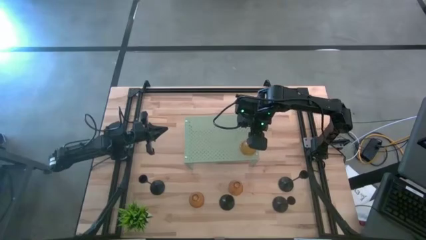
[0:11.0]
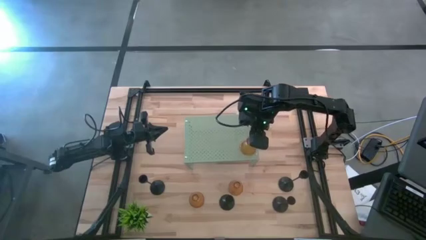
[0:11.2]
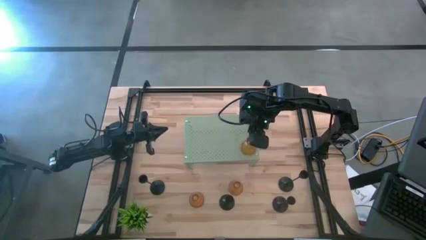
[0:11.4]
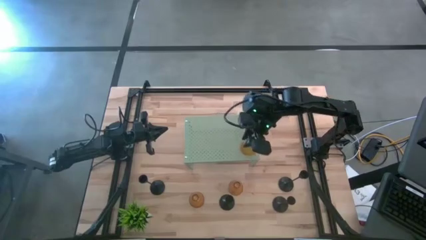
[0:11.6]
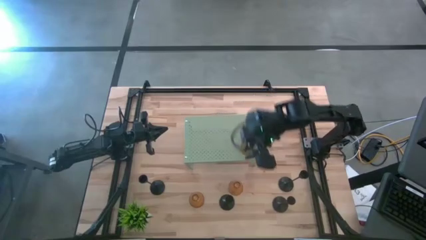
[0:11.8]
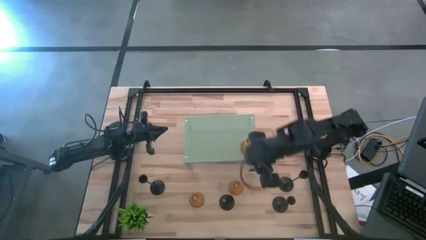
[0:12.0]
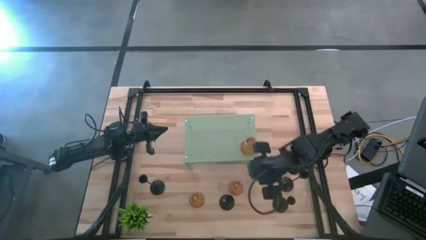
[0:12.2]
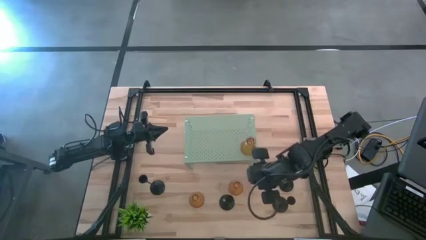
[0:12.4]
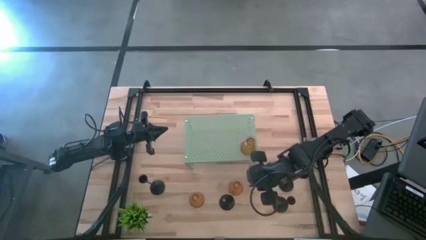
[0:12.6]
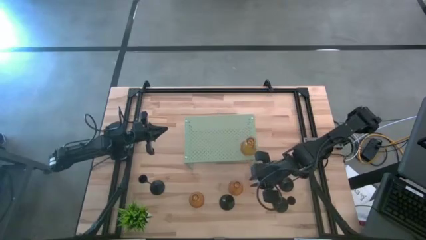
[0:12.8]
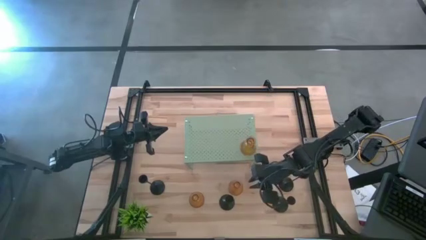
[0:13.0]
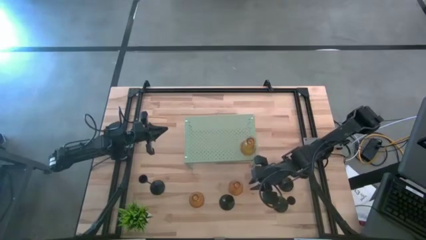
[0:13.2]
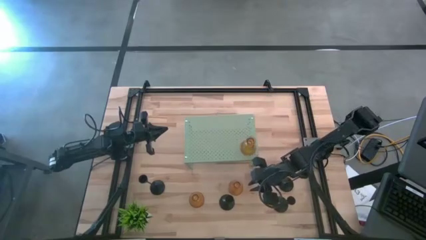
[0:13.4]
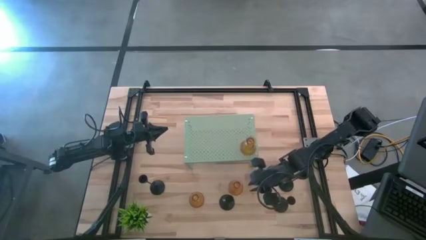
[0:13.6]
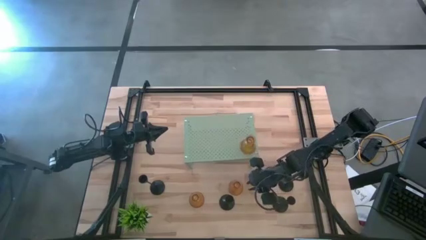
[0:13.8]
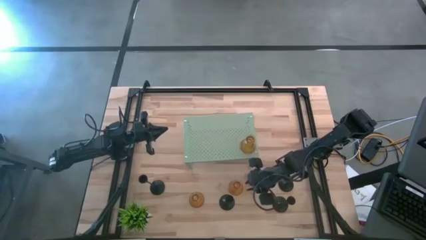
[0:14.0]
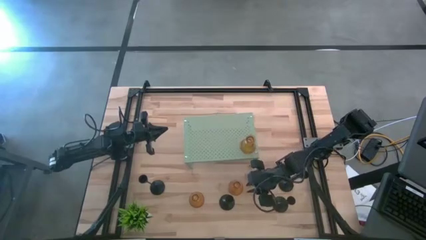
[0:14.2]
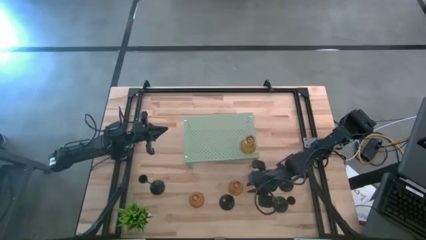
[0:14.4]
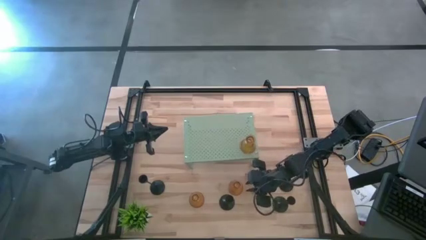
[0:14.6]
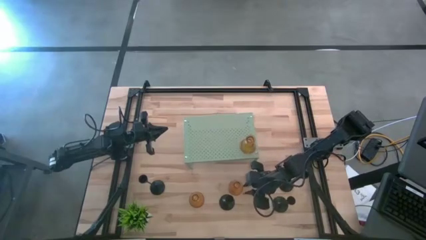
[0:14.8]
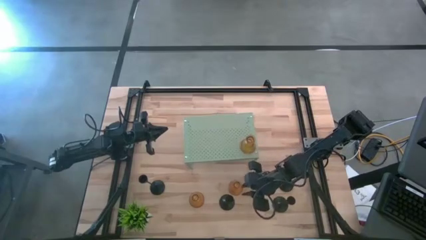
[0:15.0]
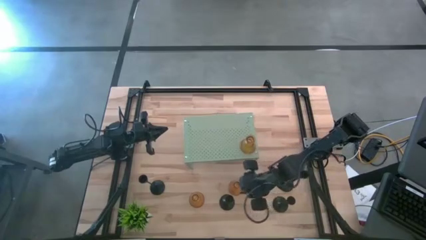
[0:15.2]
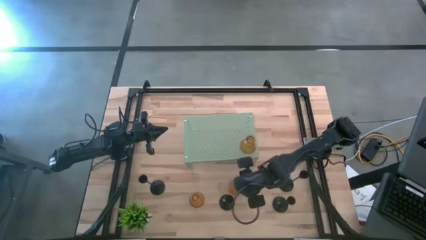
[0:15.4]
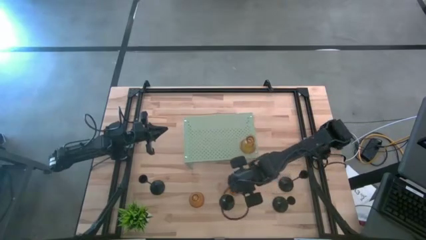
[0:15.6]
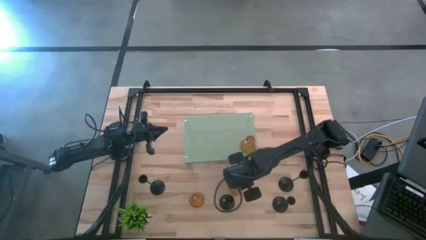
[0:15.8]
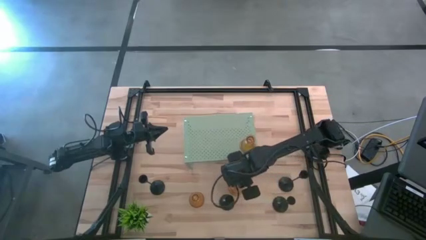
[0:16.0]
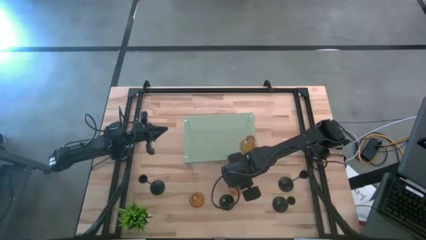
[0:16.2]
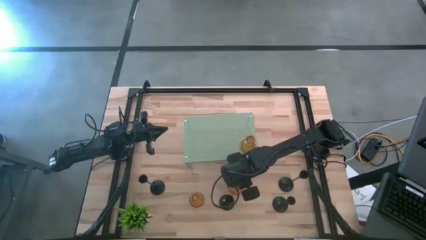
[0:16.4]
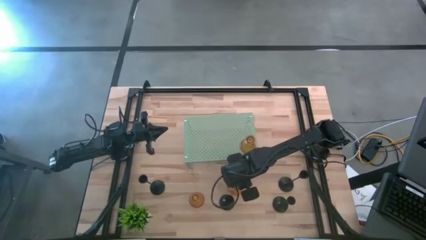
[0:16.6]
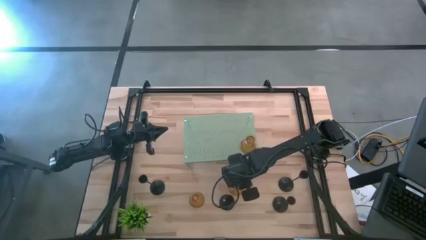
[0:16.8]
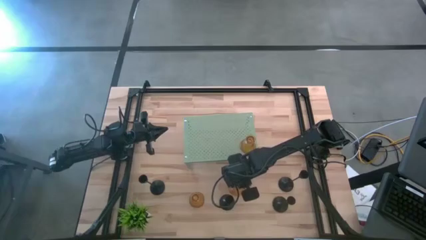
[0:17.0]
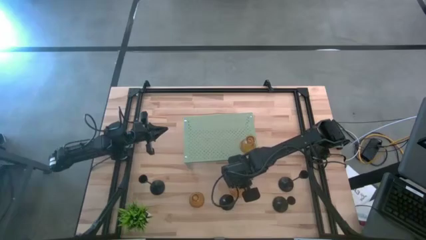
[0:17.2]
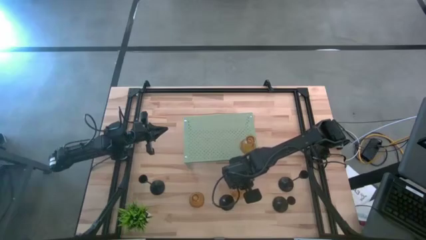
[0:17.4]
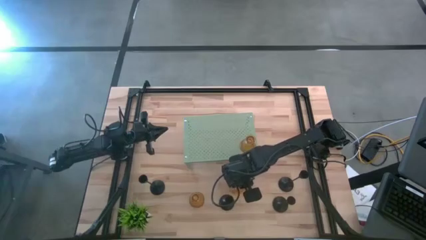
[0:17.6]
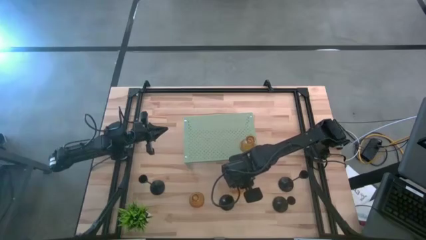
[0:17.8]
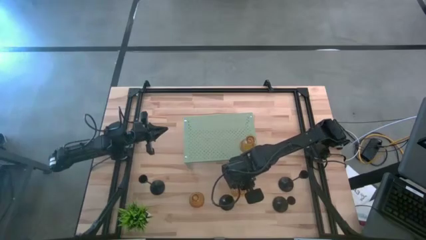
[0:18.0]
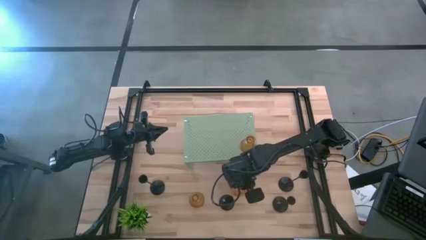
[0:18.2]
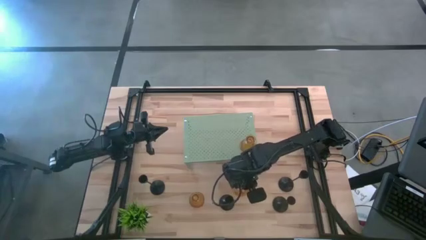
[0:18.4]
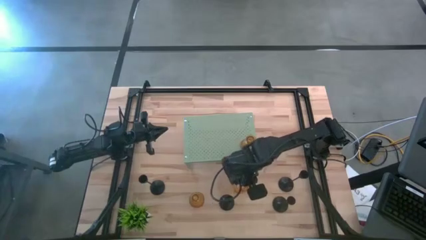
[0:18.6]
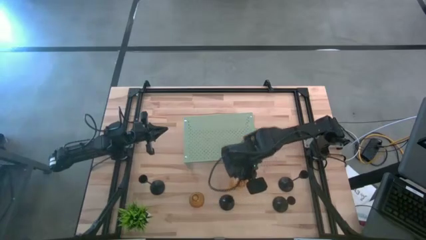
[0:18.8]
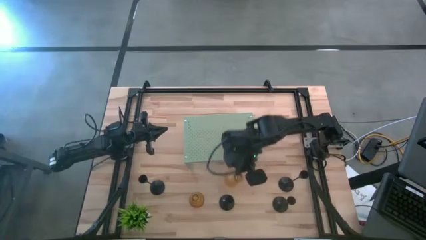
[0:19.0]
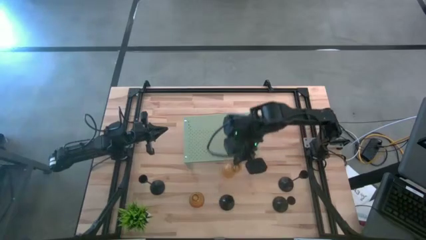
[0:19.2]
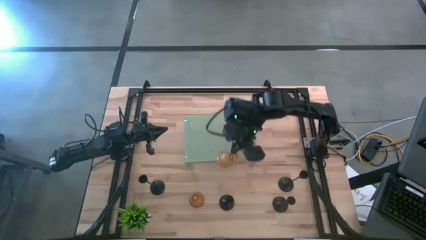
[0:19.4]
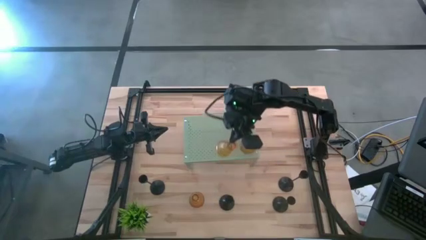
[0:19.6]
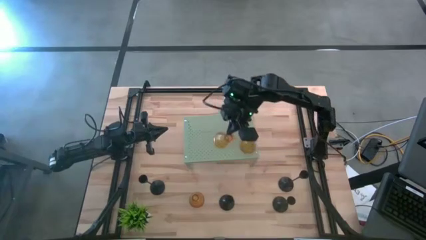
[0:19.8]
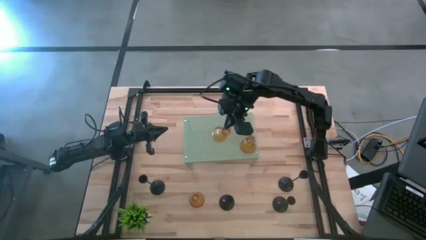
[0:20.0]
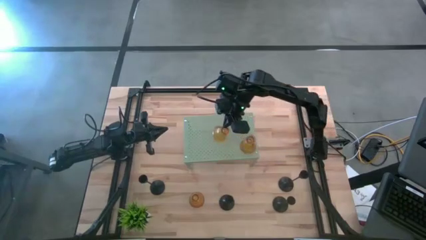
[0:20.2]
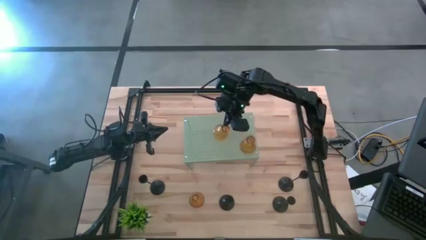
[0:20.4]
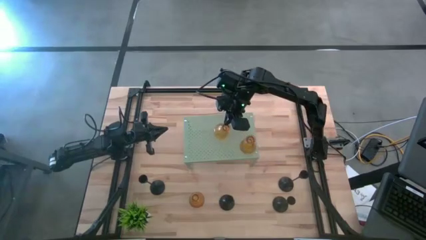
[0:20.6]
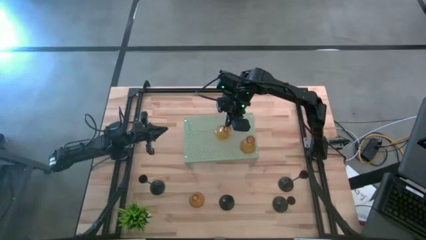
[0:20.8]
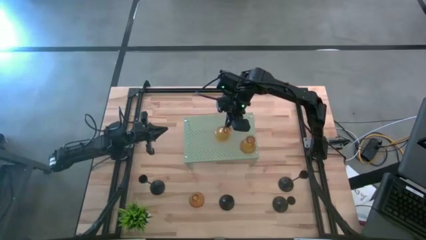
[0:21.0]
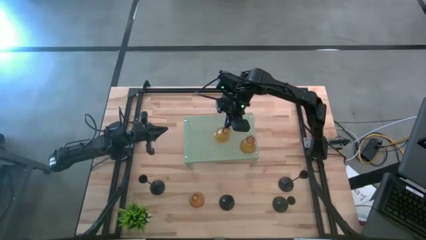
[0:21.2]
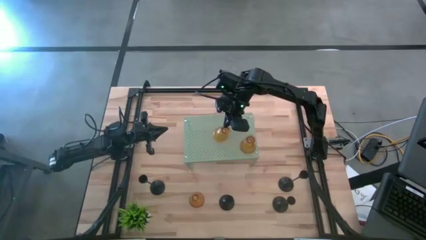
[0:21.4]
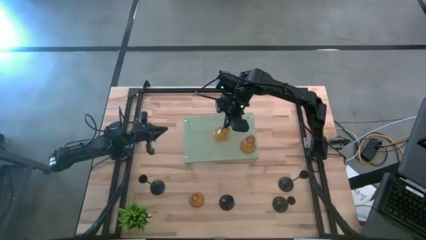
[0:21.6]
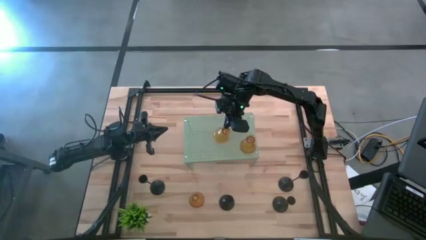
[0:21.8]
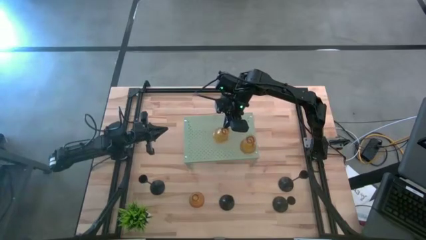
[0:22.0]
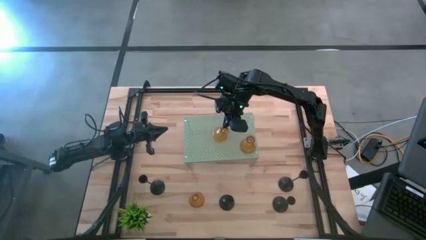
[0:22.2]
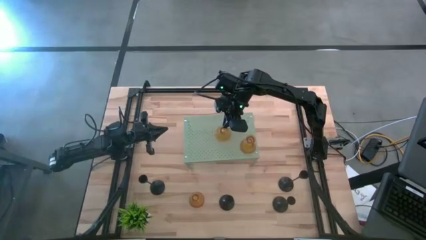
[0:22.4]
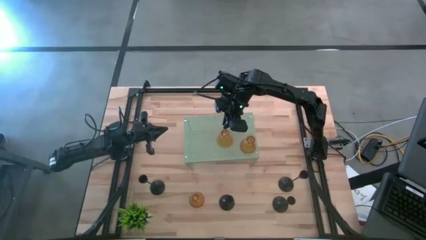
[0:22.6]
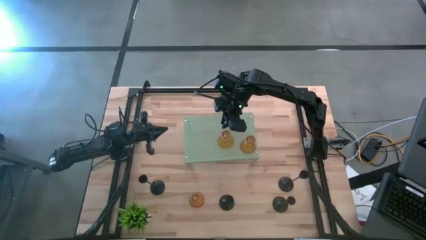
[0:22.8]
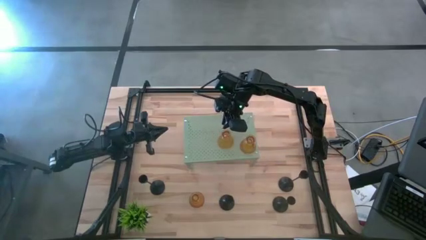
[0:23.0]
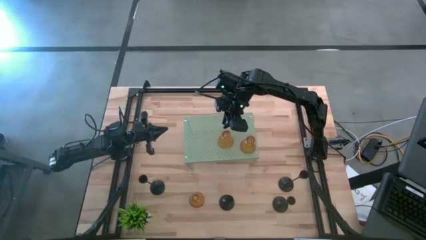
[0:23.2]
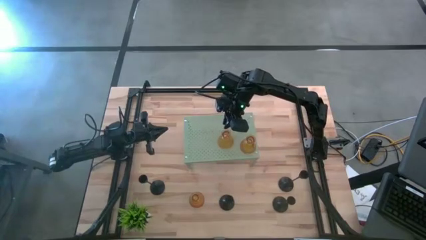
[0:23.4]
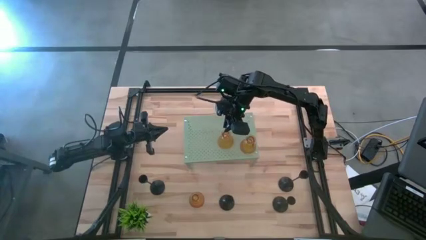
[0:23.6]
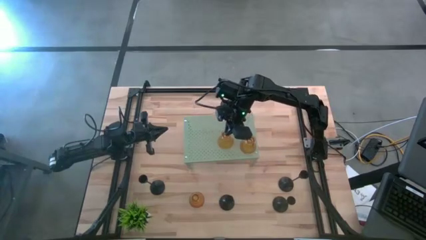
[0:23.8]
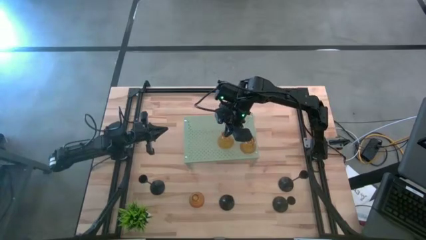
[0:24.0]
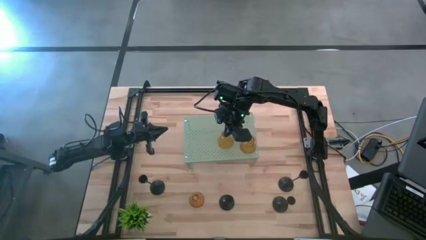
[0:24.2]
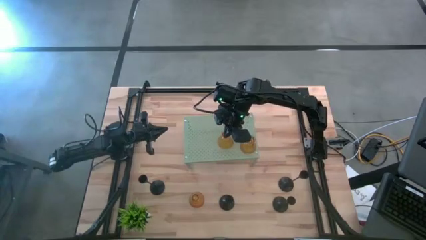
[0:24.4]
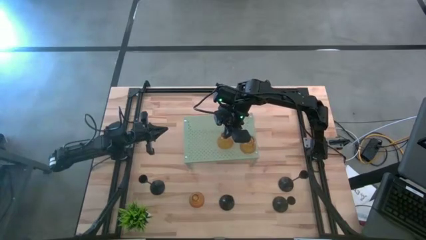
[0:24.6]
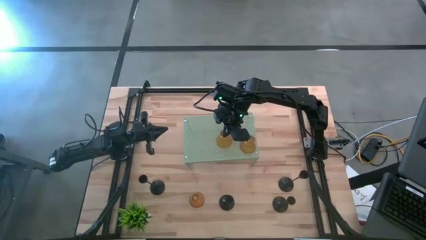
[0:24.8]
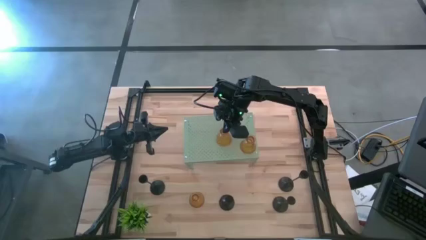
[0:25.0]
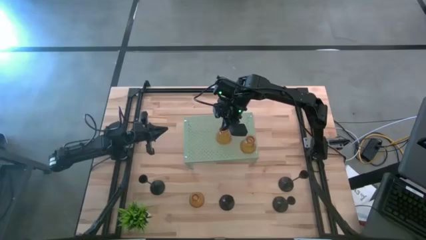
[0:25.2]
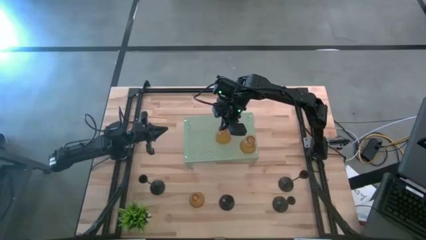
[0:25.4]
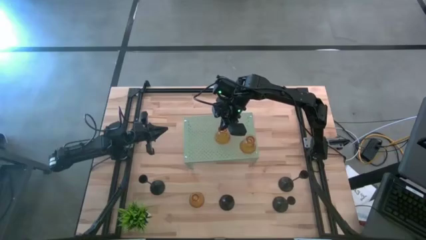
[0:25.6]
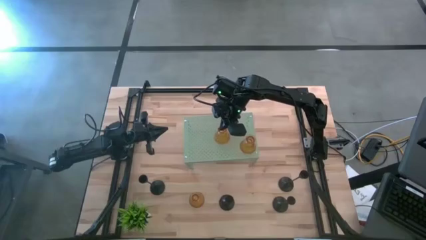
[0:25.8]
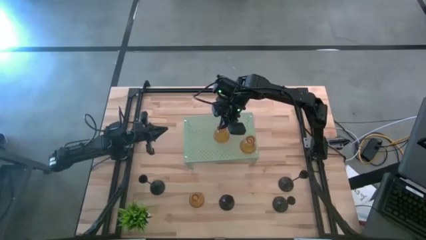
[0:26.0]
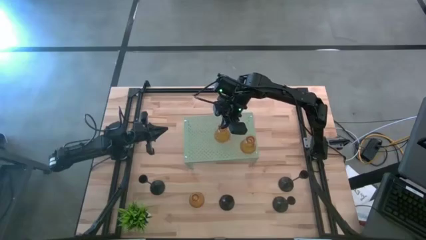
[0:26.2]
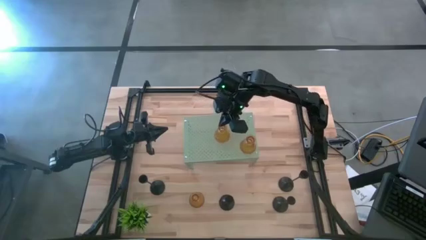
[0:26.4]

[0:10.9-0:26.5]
Task: Pick & Place candle stick holders
Put the yellow glass candle holder on the shelf
